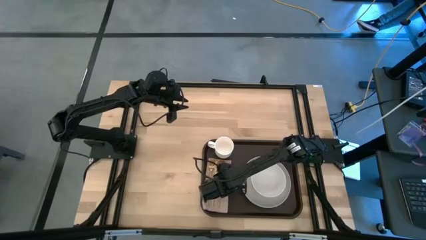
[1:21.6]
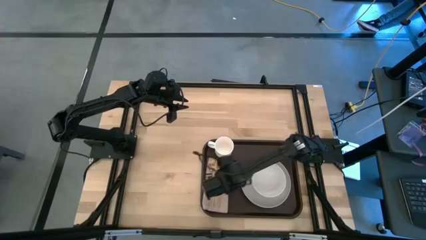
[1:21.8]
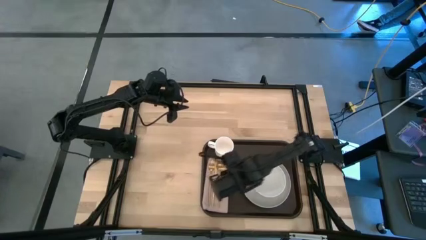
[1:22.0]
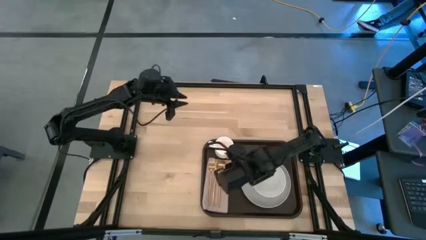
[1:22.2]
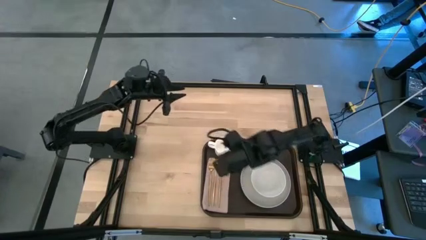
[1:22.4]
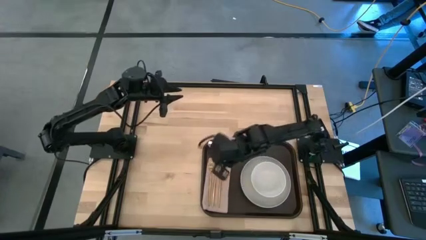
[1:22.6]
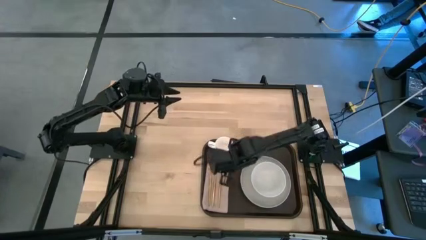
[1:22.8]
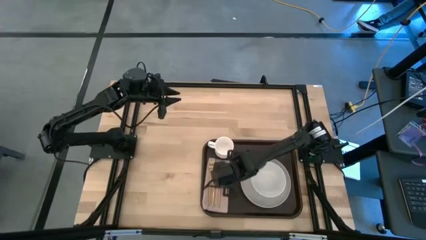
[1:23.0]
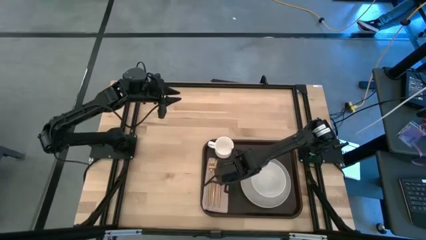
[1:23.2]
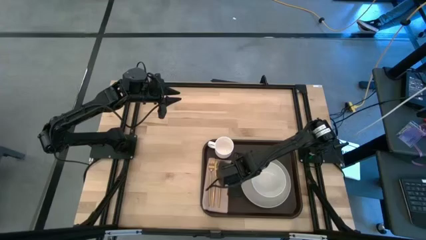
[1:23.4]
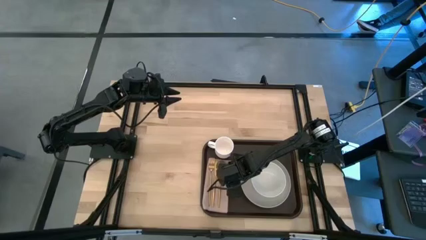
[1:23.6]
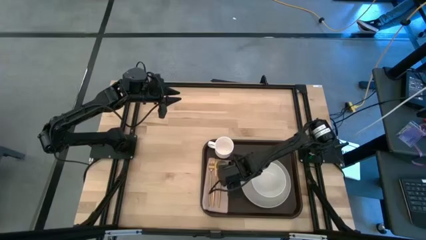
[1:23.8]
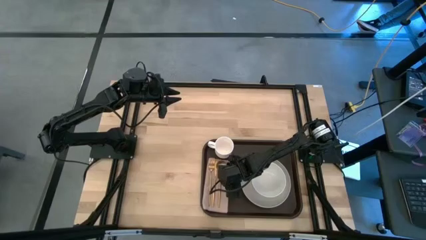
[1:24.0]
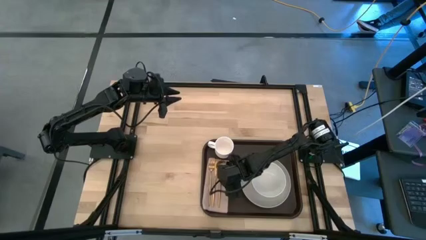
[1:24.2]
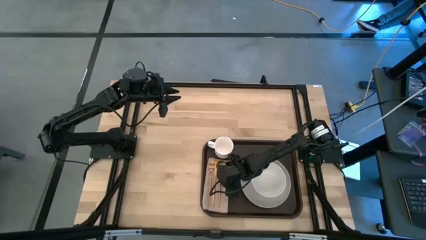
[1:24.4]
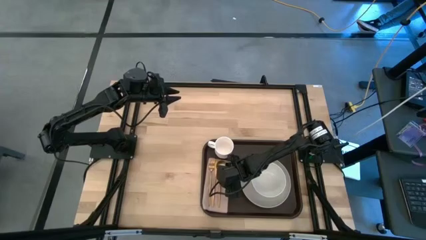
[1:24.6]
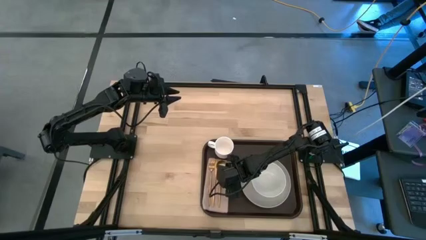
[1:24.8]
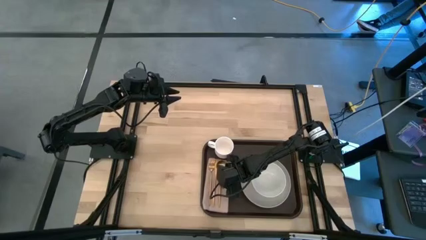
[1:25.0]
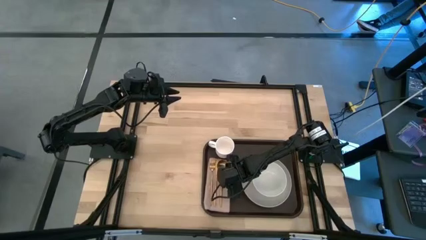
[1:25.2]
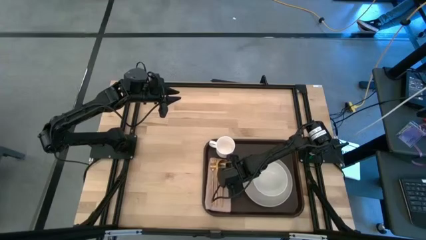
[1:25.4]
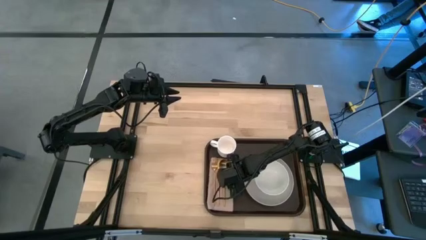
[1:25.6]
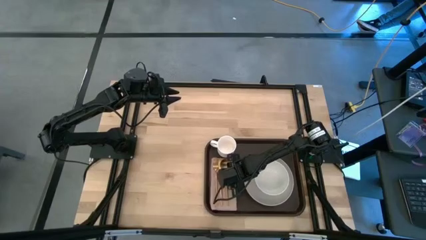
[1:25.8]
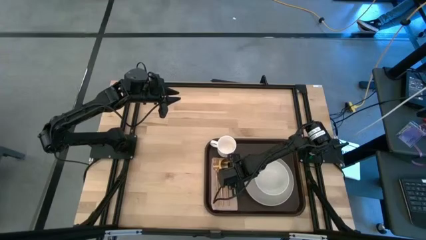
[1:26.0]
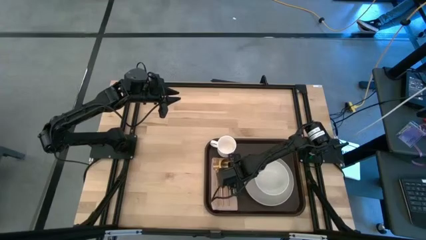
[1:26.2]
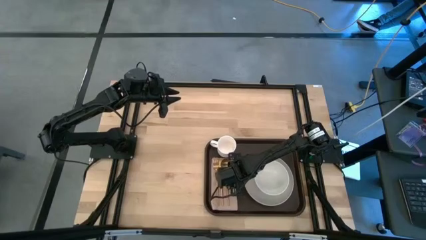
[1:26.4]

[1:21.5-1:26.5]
Task: Set up tray
Adjust the brown napkin

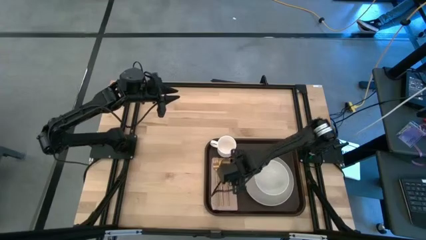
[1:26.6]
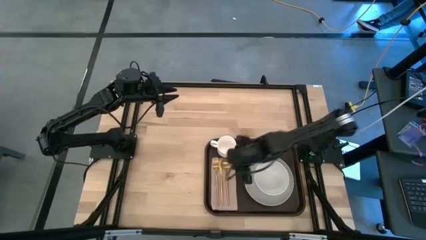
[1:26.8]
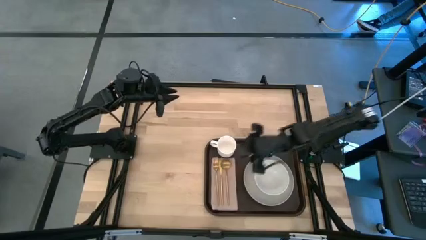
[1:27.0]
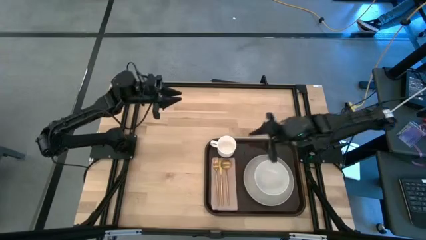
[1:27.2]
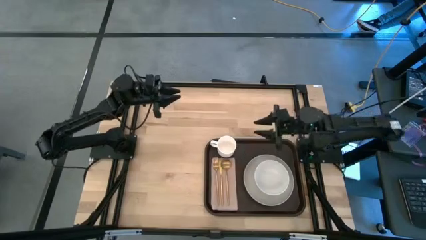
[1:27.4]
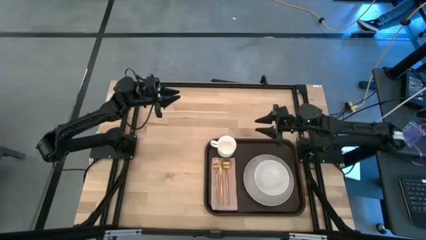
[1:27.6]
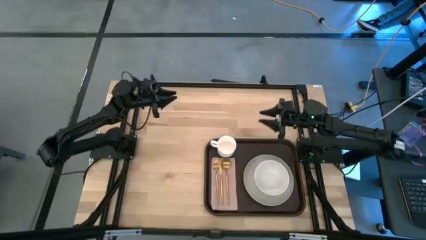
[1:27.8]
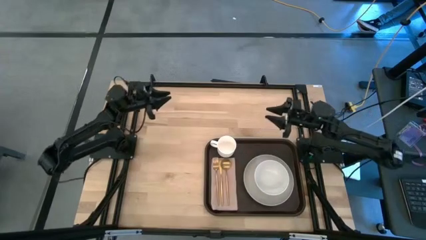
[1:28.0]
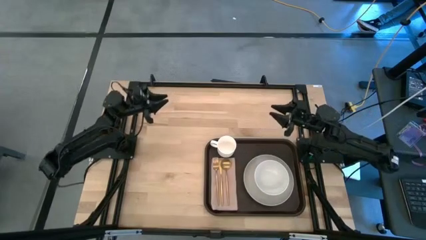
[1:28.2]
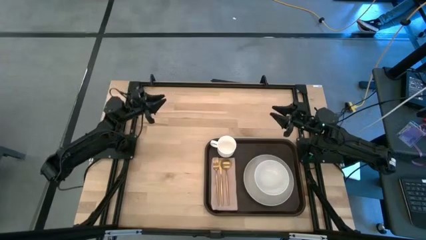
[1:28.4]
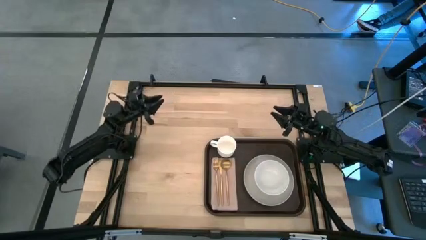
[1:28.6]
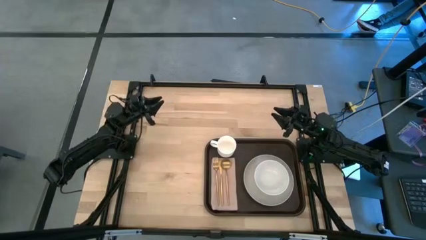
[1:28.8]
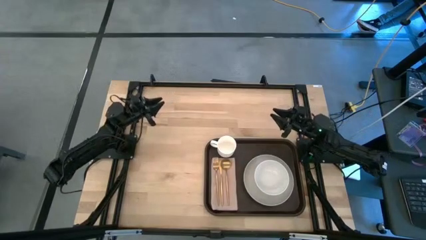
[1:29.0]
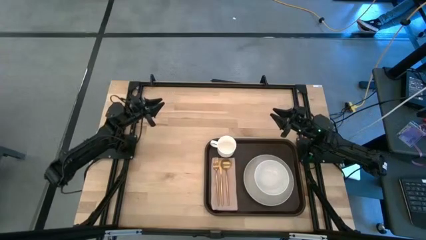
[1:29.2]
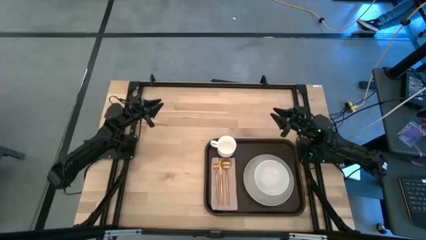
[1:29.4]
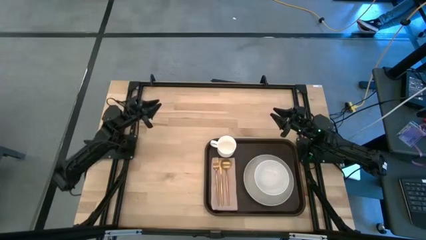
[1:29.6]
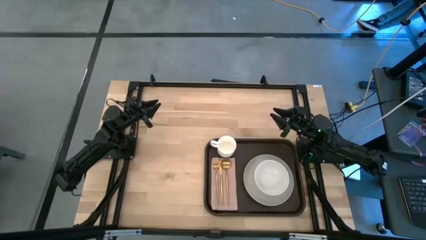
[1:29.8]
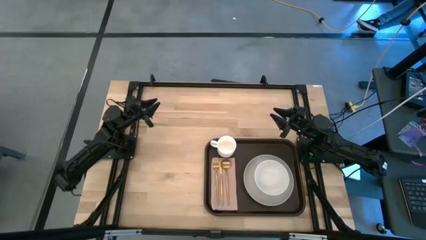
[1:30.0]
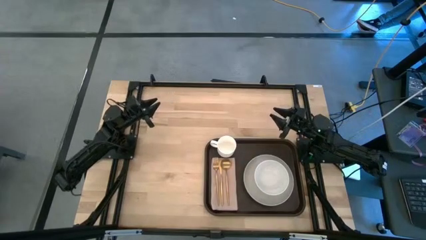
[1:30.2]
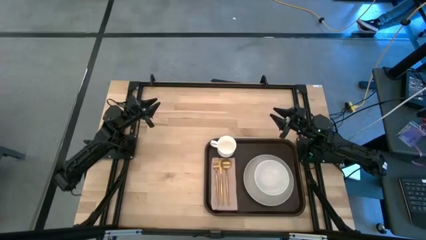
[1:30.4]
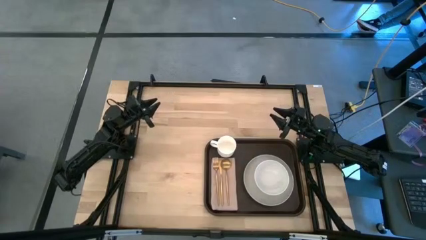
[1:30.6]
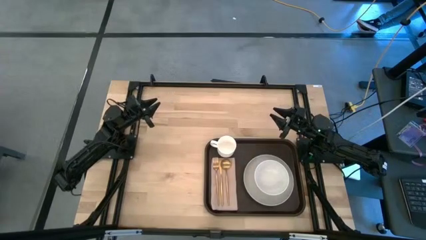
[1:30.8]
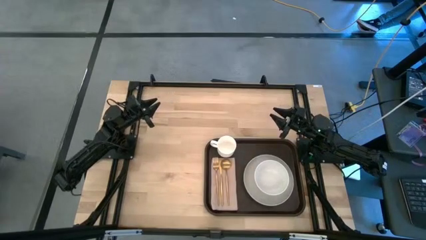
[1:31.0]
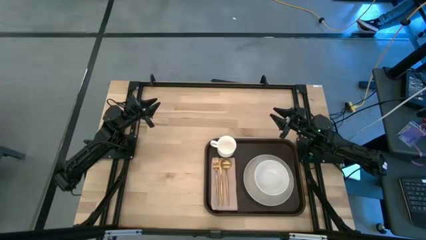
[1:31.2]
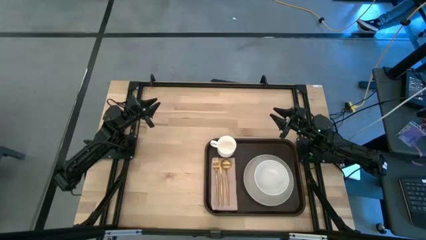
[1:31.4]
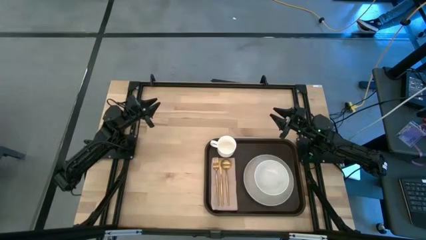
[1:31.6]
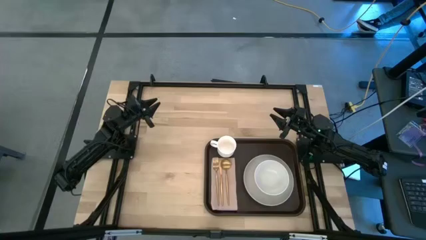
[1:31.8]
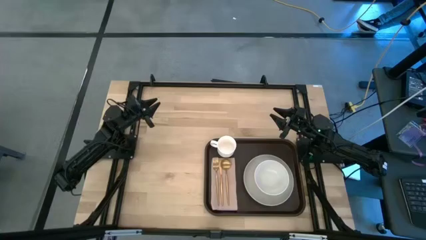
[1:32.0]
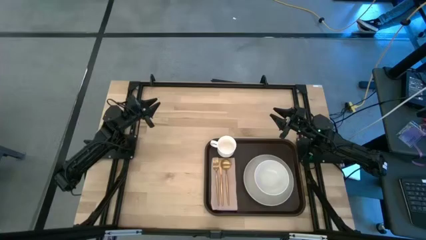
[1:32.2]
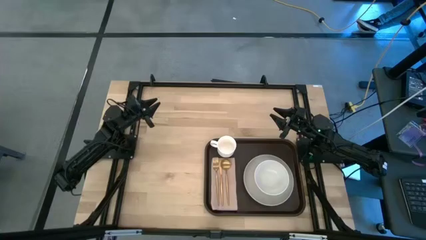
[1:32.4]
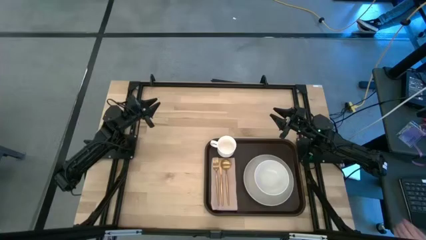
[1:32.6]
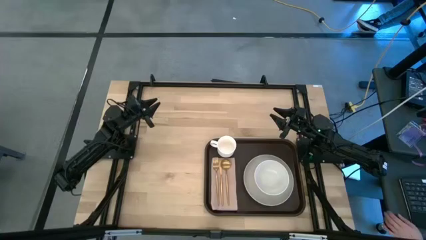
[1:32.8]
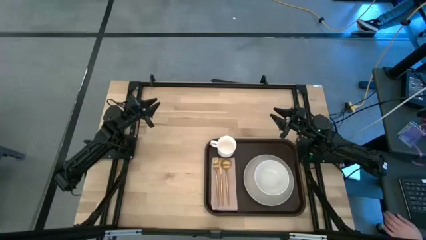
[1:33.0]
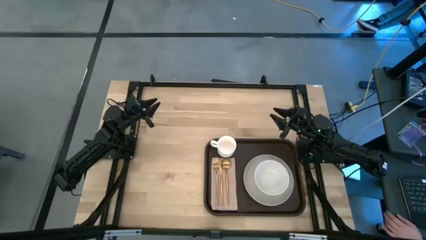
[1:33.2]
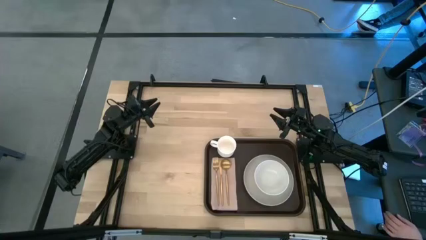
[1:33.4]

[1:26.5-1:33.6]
Return to Home Position

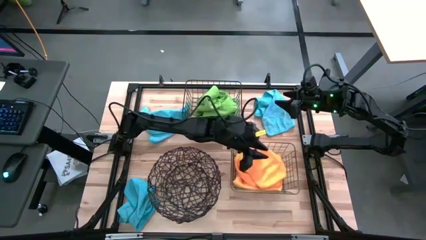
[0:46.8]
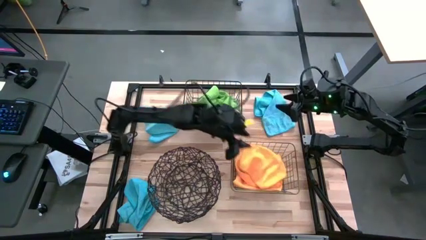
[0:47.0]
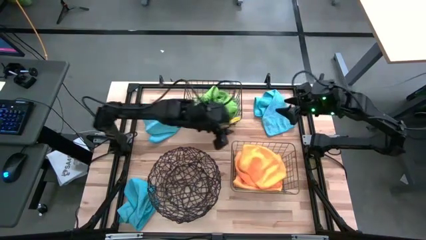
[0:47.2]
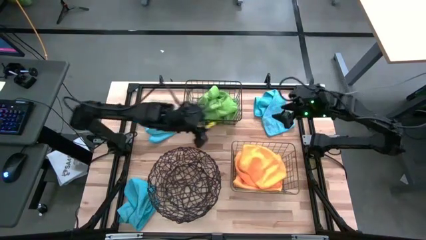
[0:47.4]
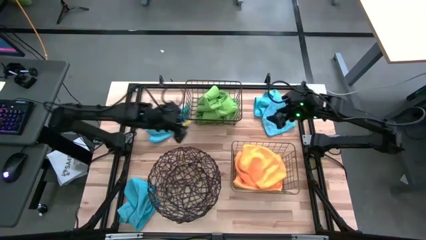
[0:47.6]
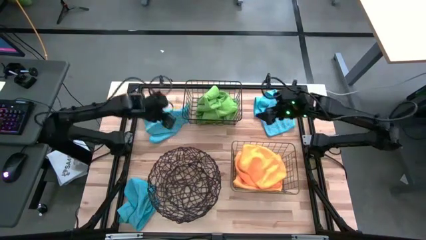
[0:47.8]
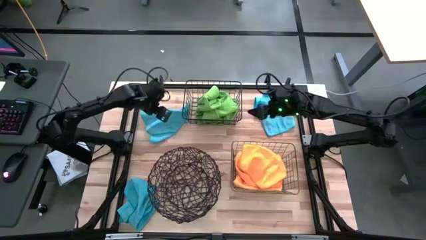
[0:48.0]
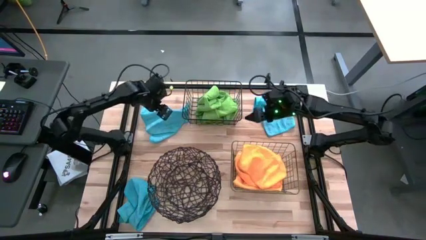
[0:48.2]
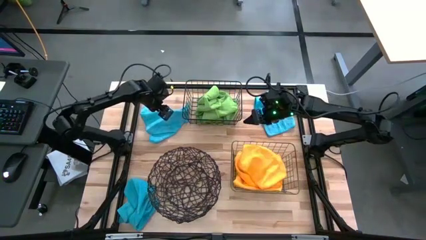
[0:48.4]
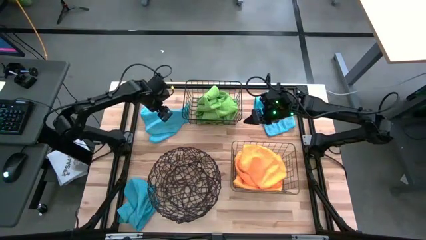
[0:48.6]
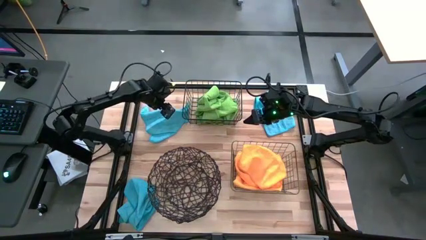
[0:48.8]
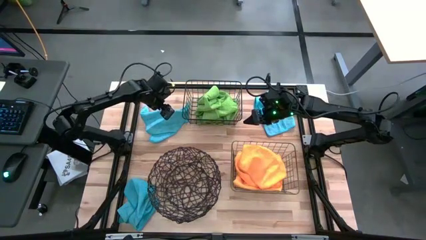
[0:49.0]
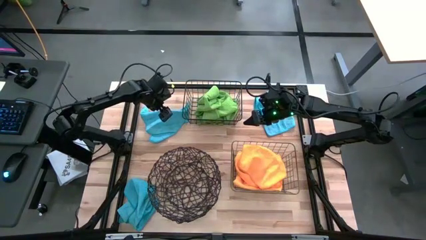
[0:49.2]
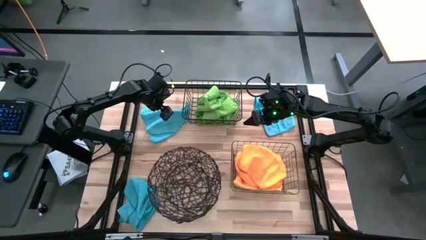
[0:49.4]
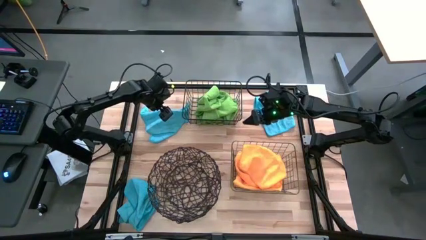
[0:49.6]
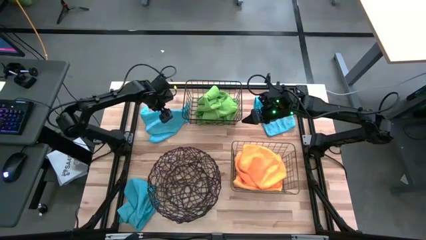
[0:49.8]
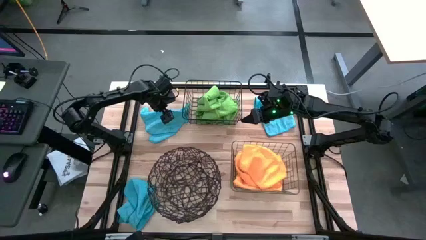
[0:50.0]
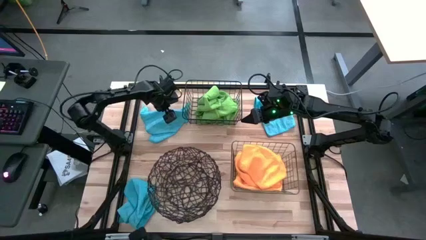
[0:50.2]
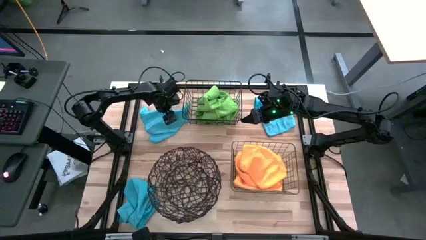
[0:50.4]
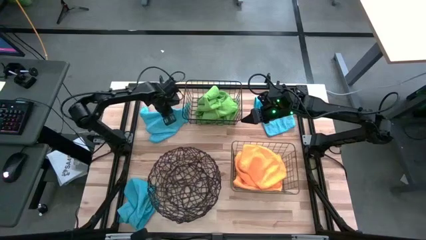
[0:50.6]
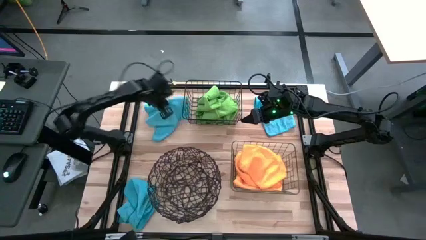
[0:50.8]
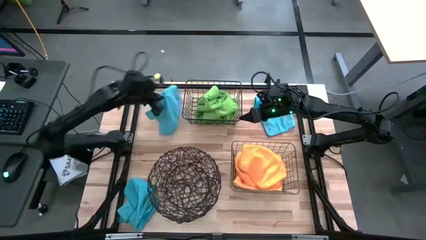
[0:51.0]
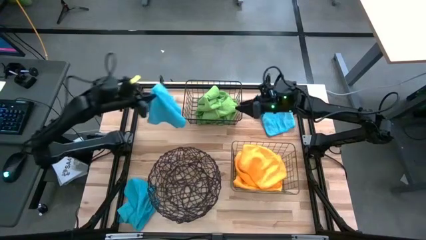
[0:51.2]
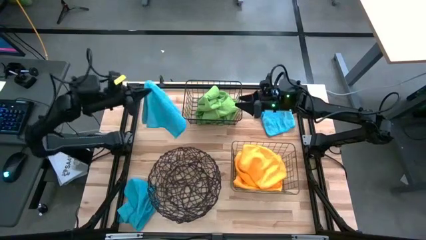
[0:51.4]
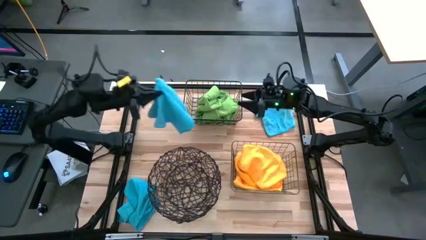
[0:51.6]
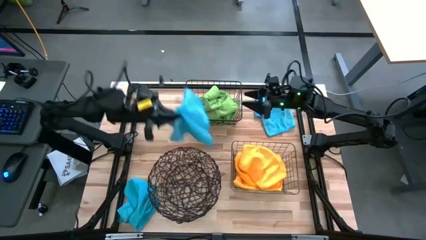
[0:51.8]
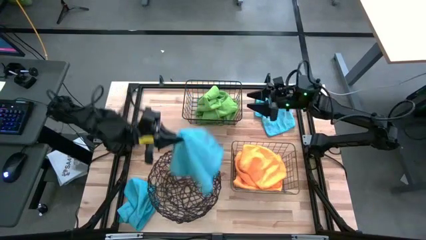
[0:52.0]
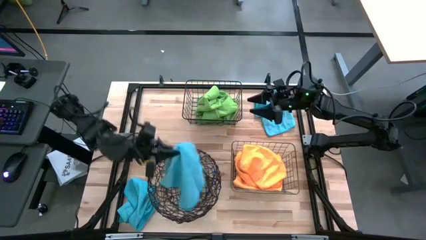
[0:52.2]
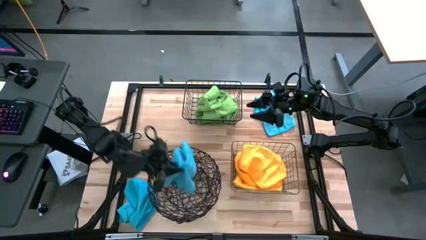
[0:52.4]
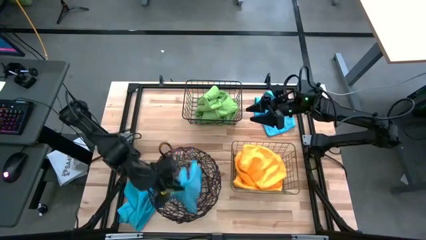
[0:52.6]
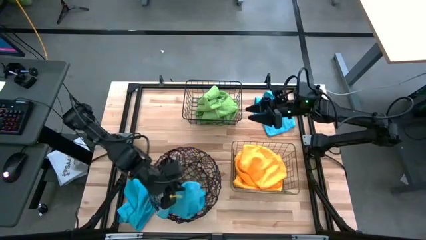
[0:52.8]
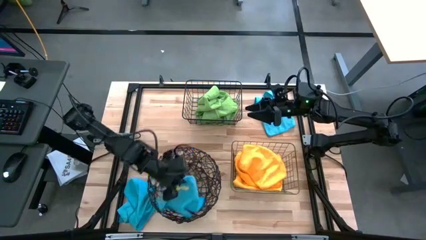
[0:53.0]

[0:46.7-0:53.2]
Task: Sort microfiber towel by color & place in baskets
Put the top left blue towel into the bottom wire basket
